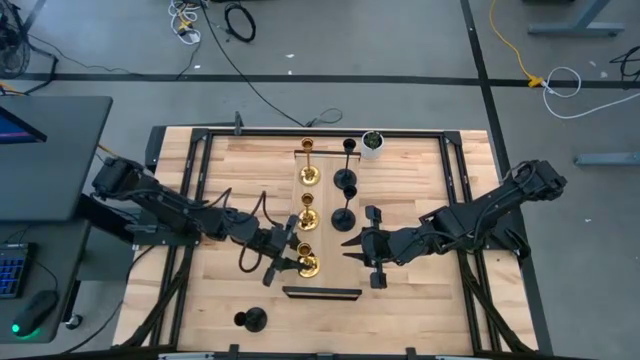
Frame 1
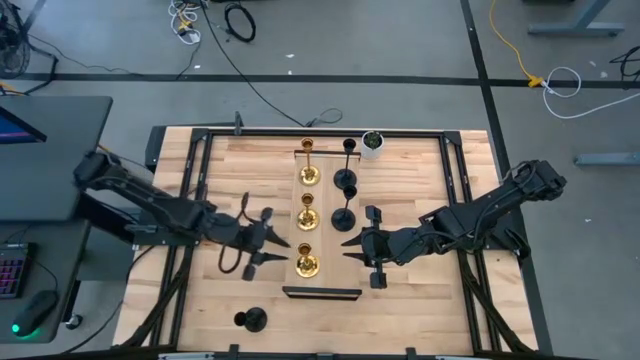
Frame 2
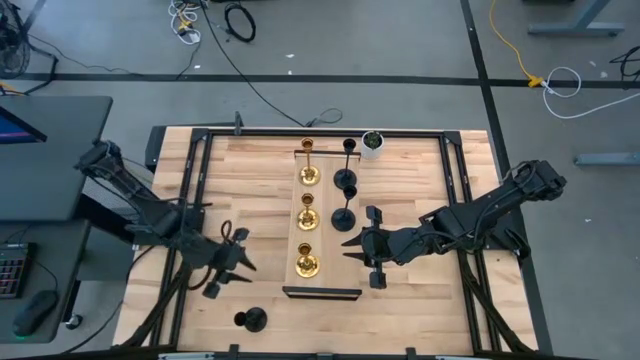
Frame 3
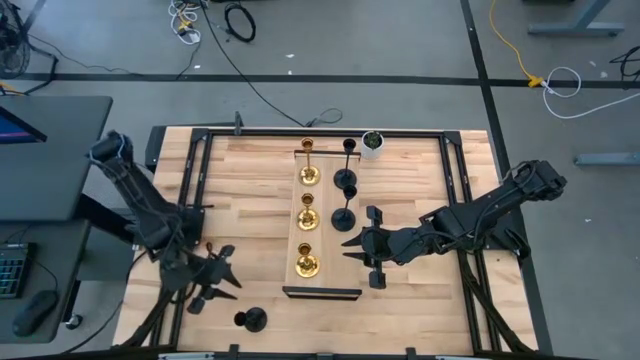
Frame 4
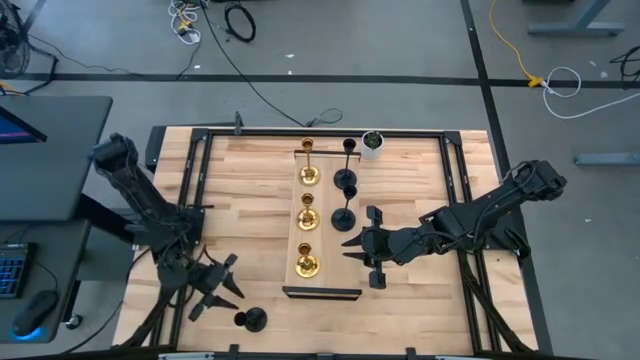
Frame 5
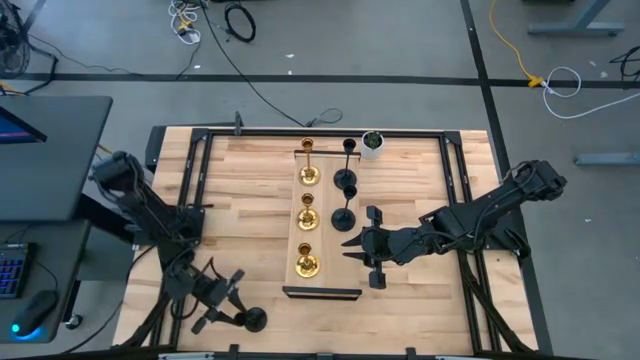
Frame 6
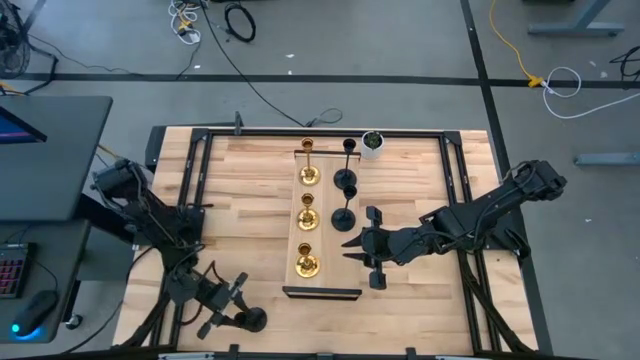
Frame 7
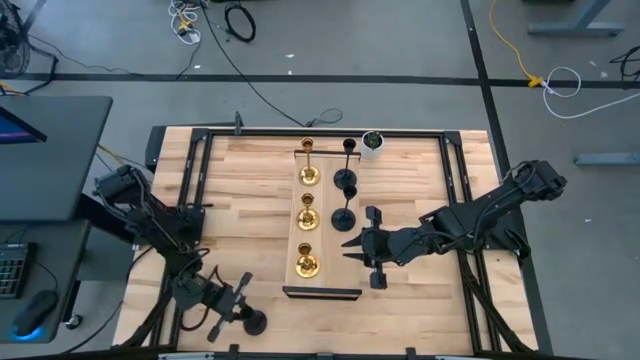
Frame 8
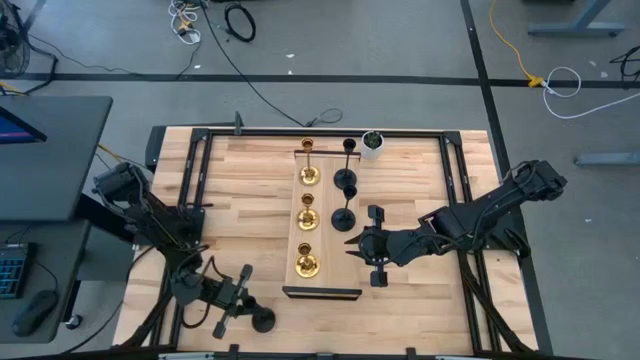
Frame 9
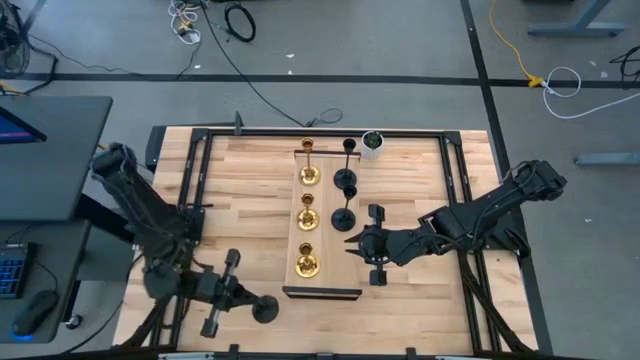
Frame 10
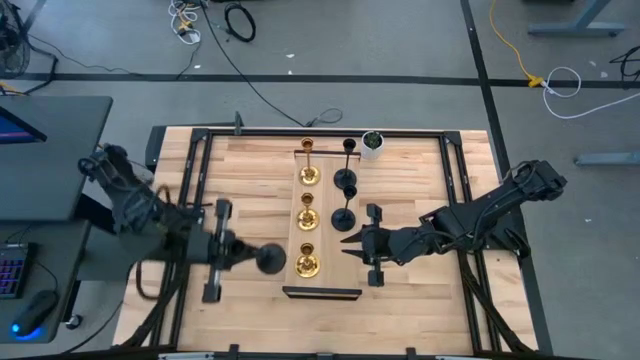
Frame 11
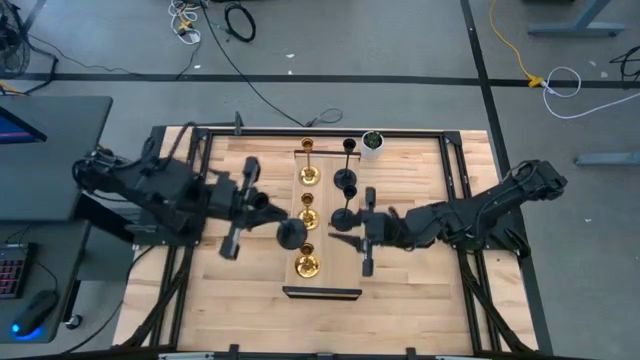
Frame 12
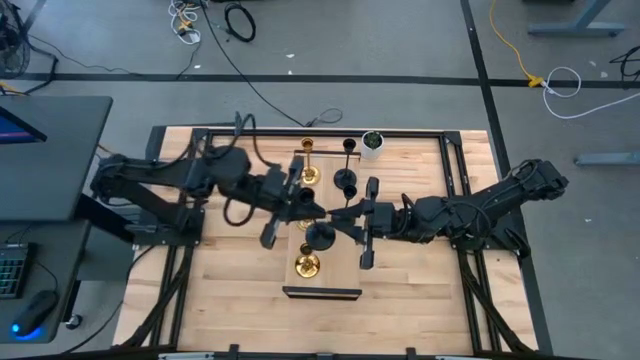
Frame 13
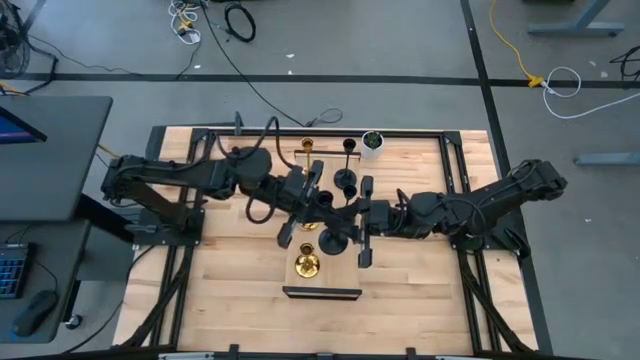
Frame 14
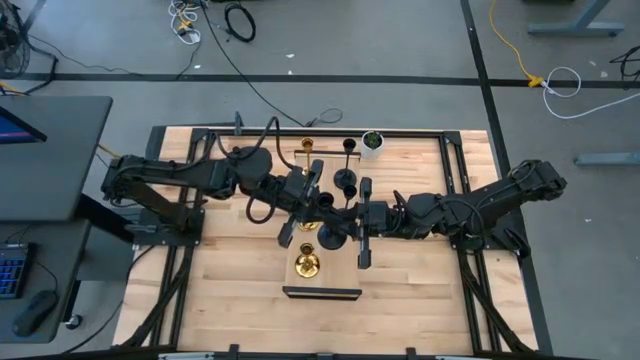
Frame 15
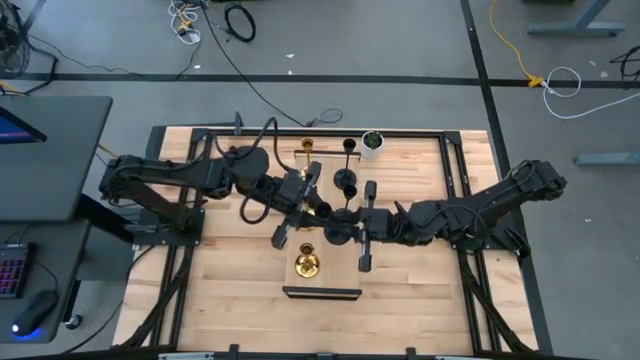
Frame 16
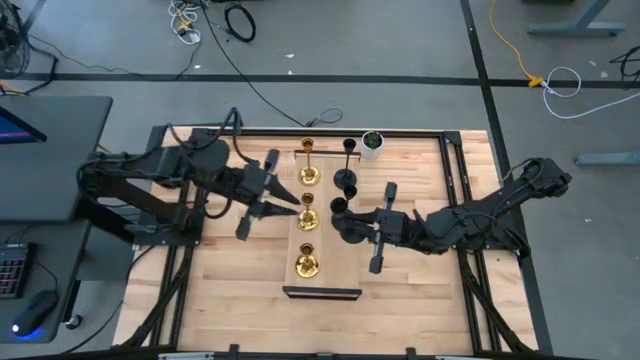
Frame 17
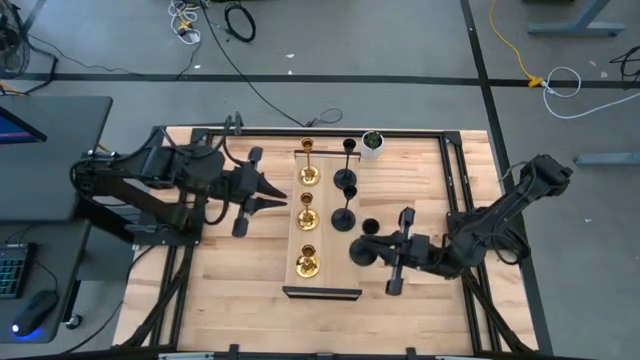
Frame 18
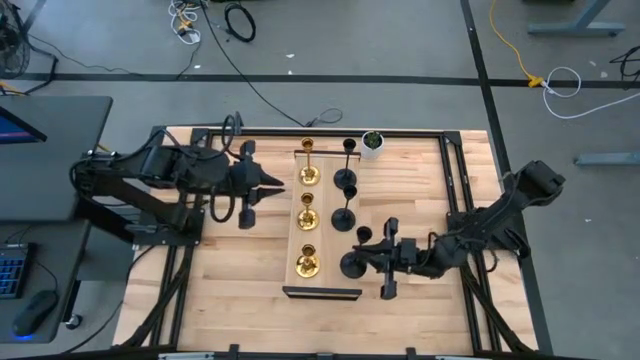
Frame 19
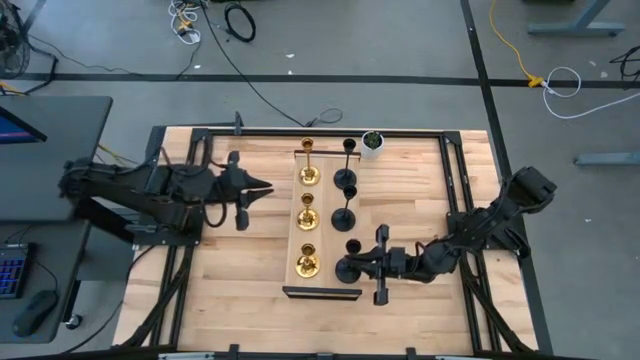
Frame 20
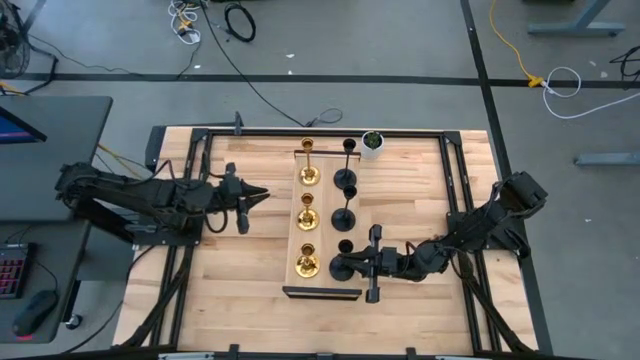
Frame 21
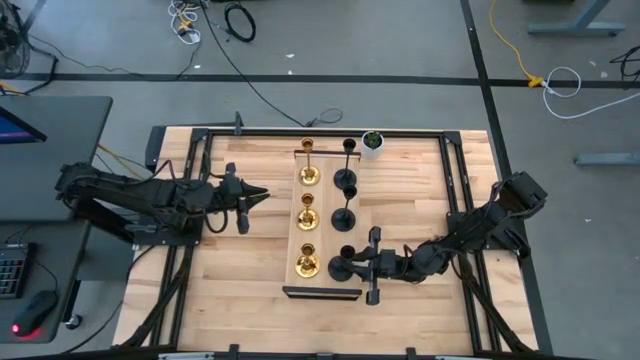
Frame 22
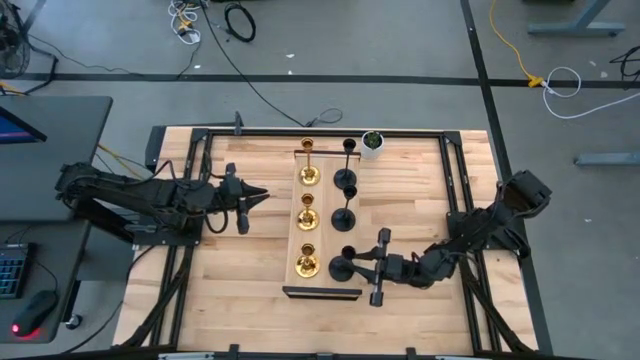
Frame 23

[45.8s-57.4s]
Task: Pick & Place candle stick holders
Put the black candle holder on the shelf

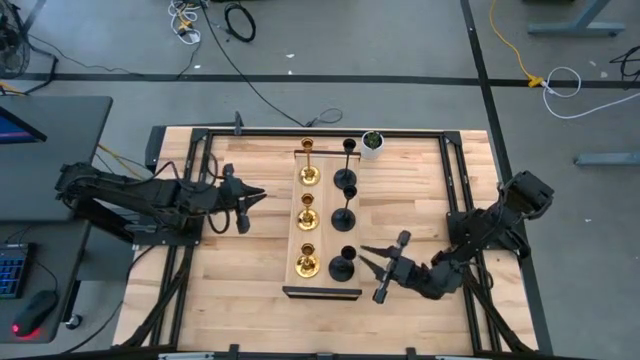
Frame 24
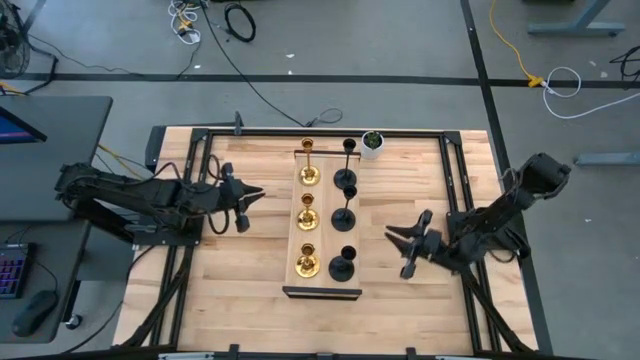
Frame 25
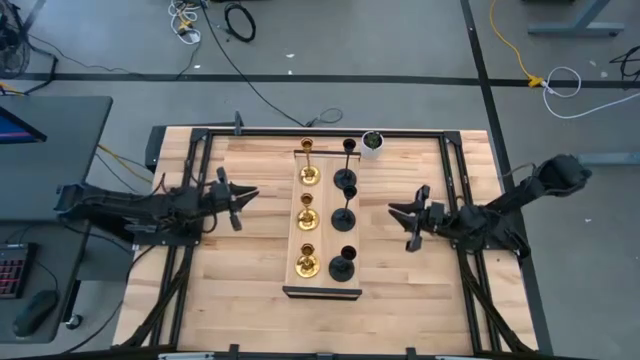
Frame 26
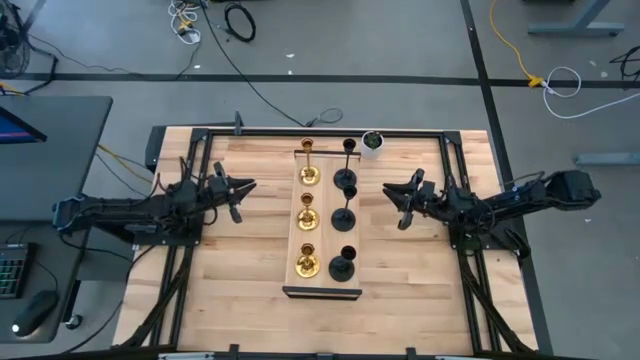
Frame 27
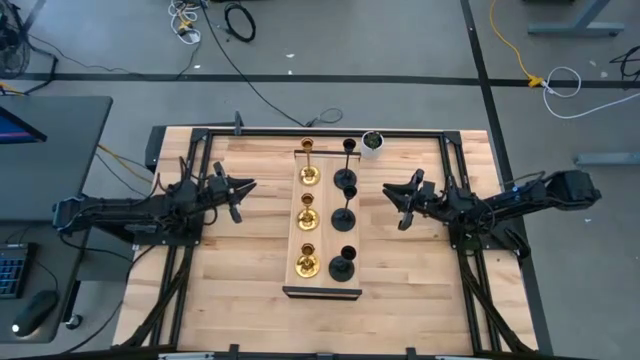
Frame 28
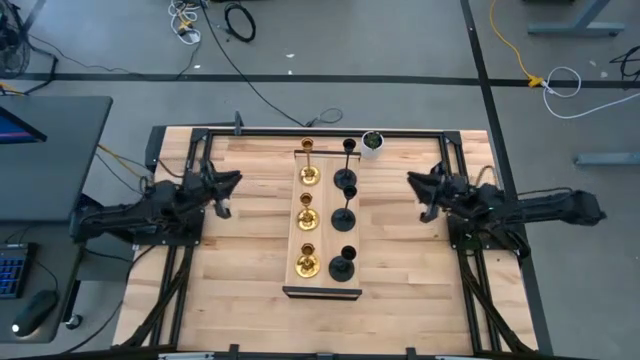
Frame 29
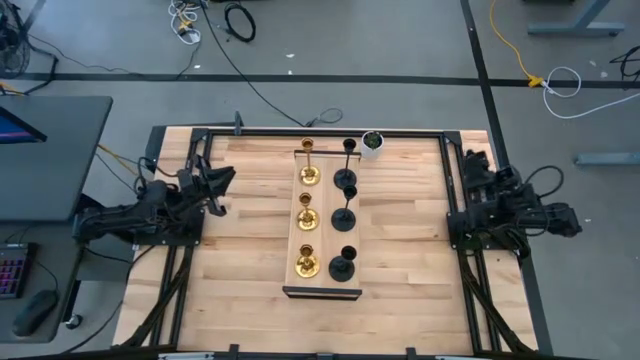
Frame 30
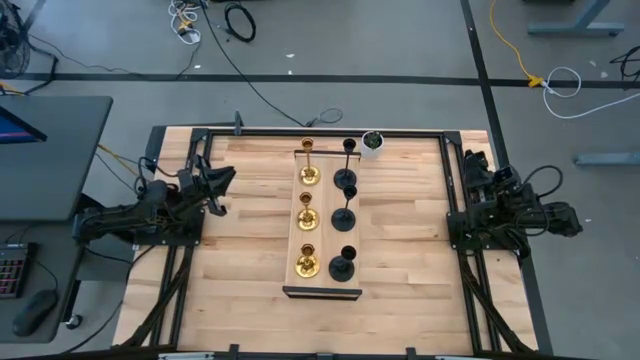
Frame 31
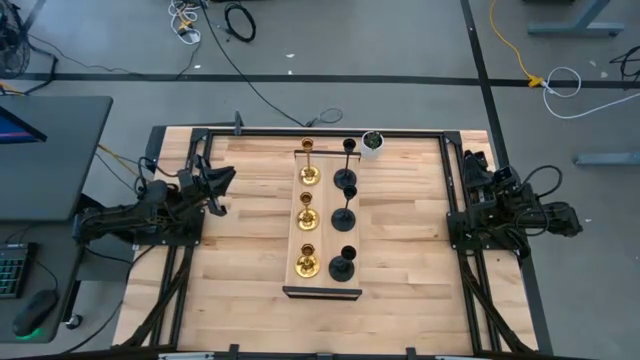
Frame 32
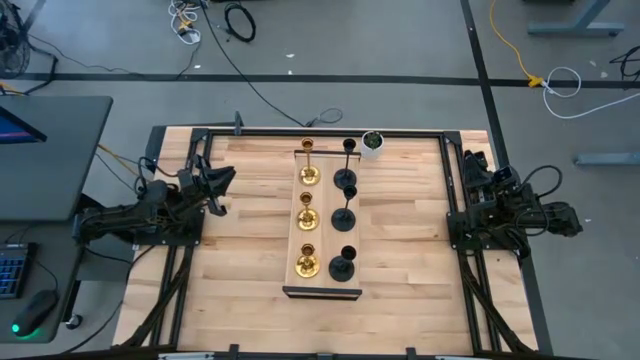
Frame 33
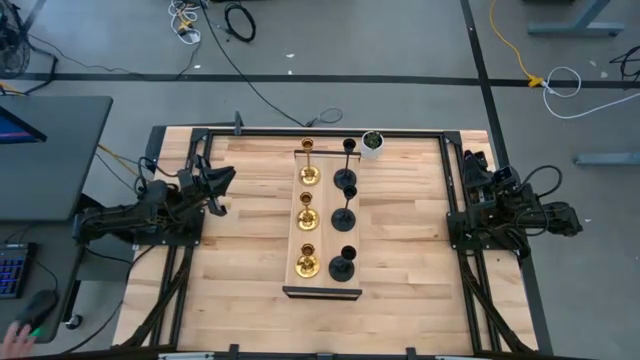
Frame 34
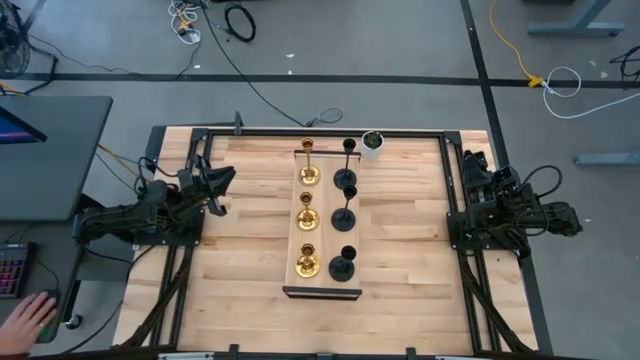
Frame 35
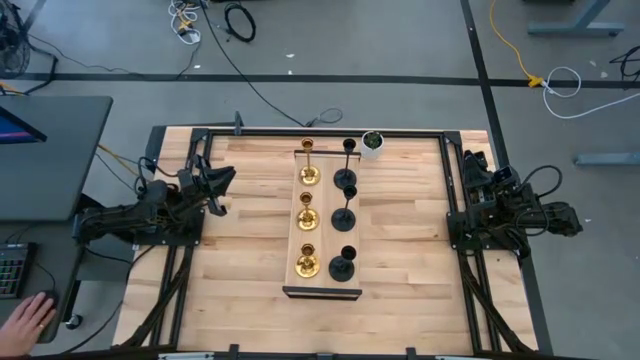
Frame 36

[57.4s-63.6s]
Return to Home Position
